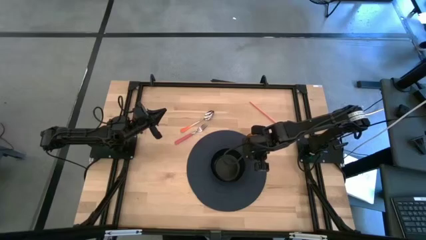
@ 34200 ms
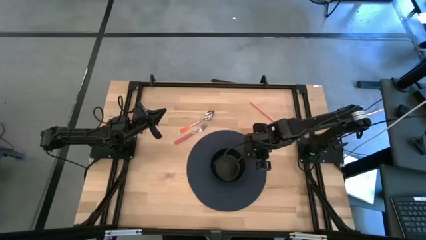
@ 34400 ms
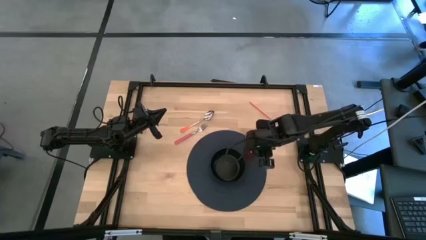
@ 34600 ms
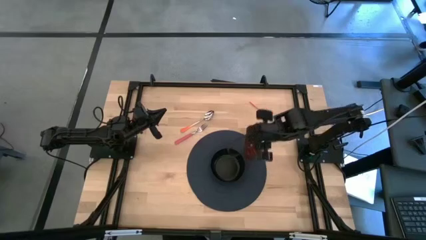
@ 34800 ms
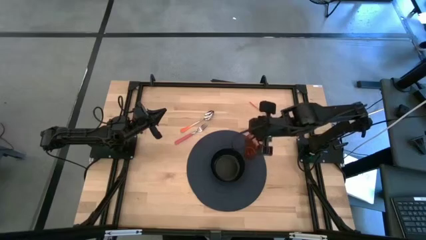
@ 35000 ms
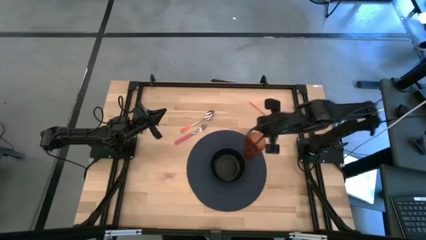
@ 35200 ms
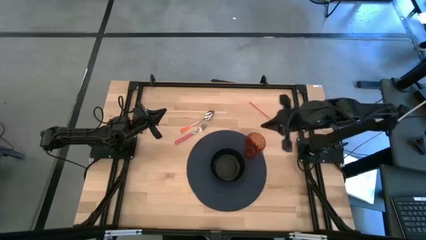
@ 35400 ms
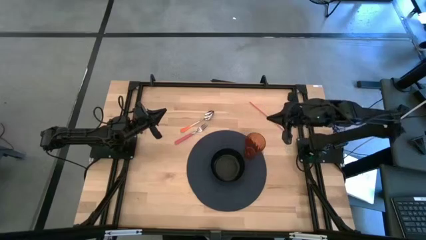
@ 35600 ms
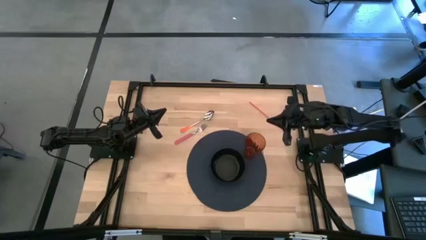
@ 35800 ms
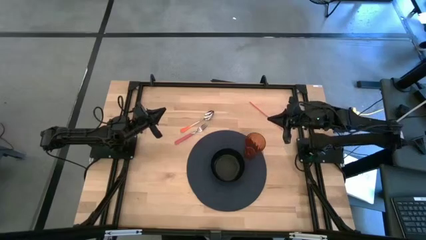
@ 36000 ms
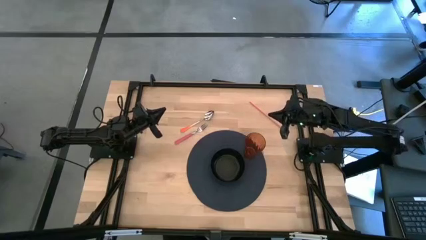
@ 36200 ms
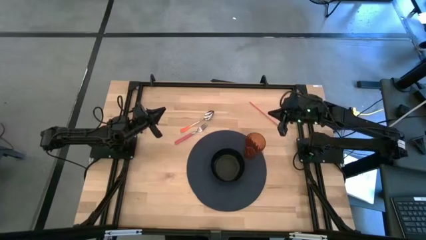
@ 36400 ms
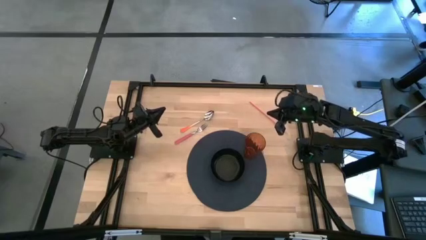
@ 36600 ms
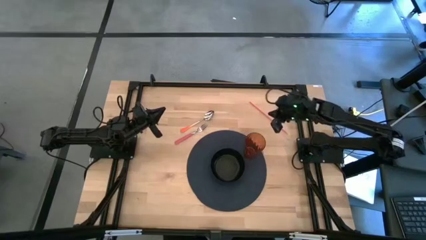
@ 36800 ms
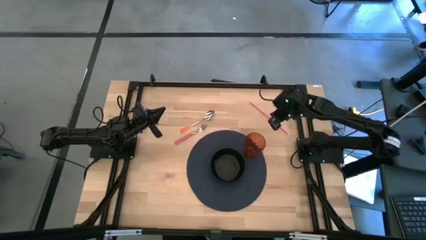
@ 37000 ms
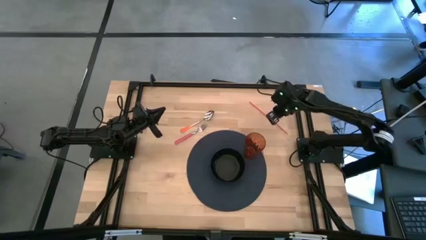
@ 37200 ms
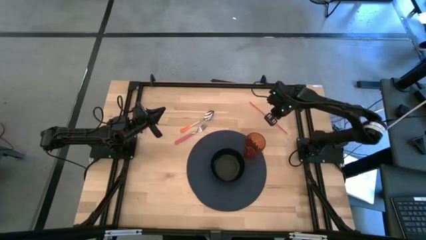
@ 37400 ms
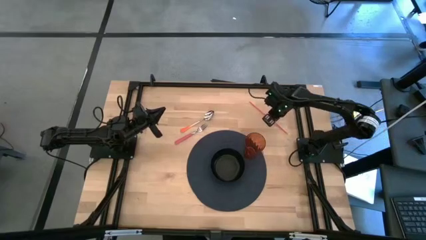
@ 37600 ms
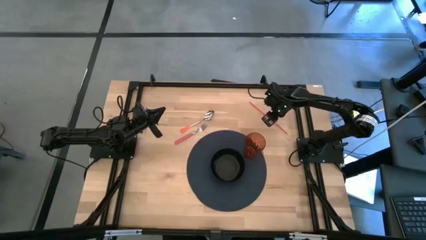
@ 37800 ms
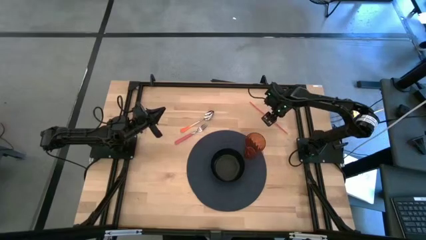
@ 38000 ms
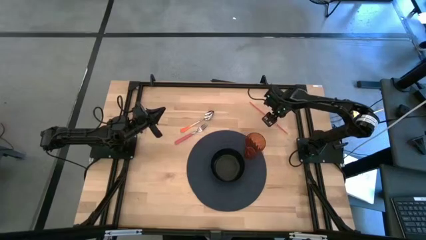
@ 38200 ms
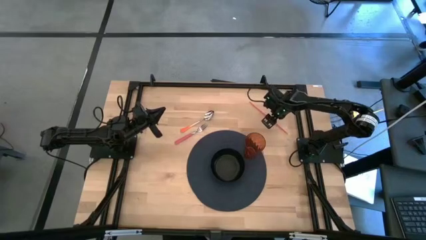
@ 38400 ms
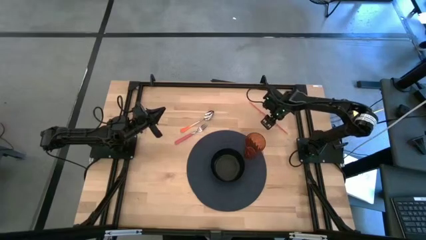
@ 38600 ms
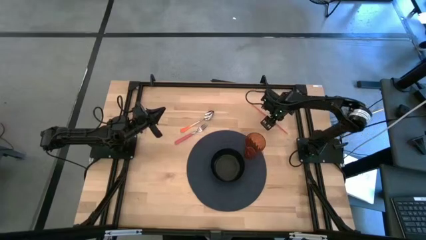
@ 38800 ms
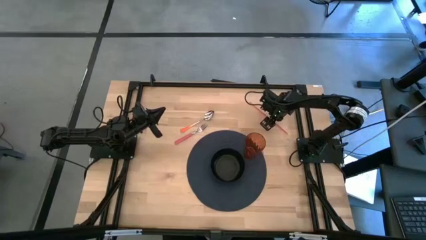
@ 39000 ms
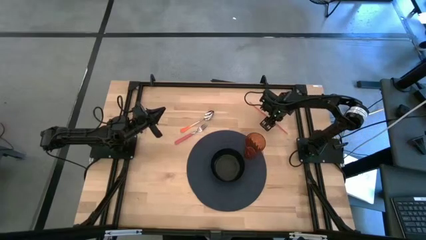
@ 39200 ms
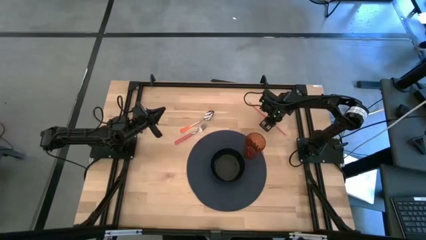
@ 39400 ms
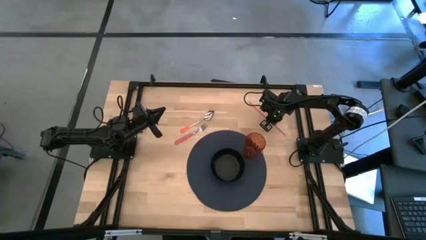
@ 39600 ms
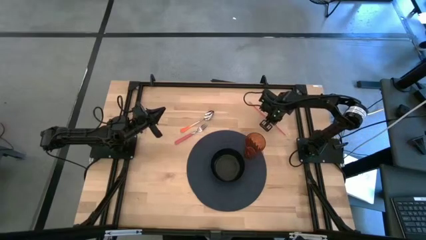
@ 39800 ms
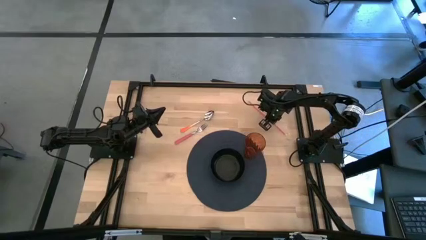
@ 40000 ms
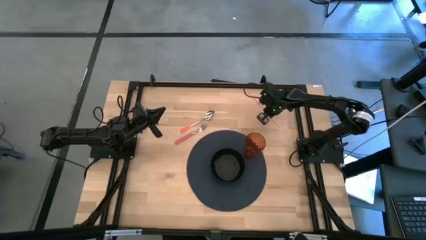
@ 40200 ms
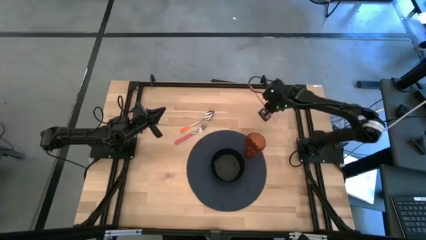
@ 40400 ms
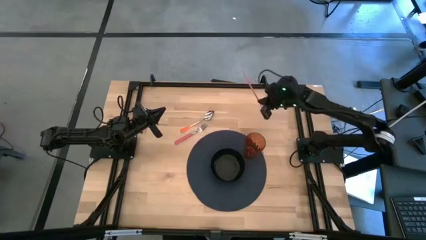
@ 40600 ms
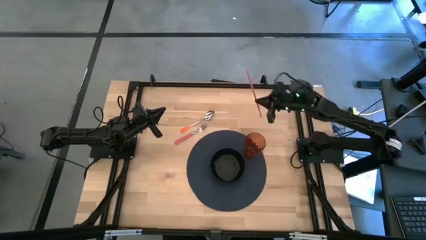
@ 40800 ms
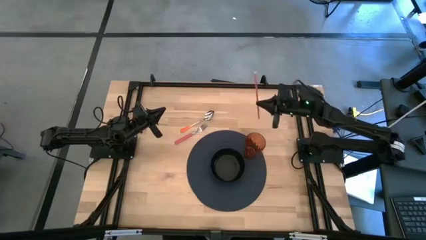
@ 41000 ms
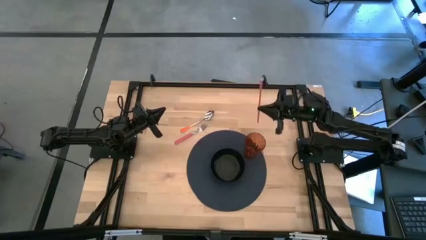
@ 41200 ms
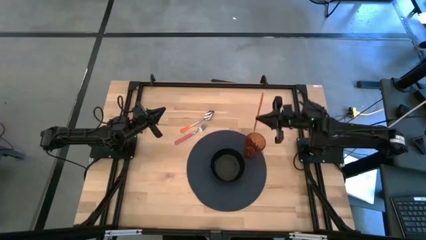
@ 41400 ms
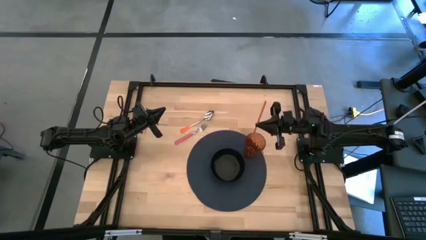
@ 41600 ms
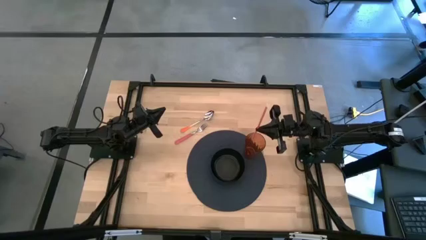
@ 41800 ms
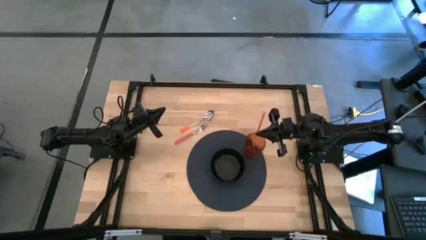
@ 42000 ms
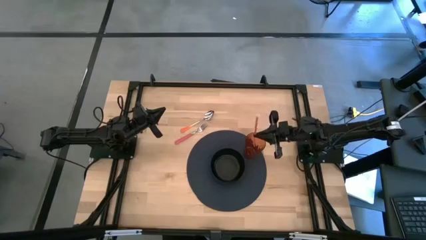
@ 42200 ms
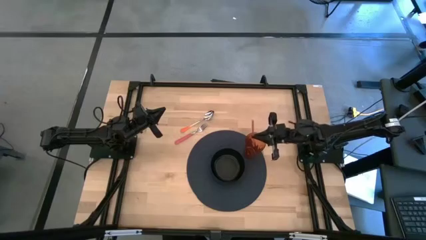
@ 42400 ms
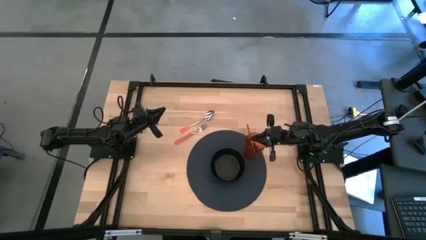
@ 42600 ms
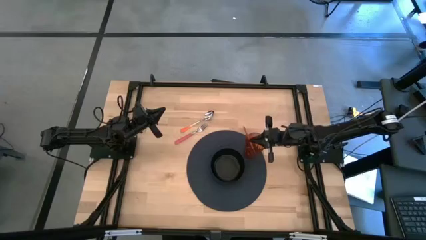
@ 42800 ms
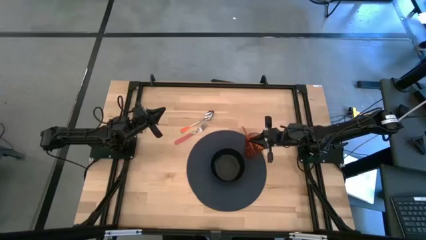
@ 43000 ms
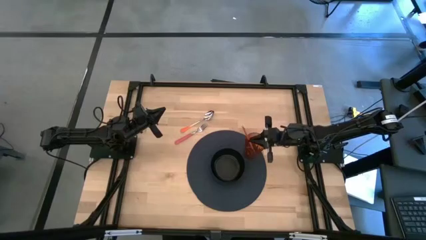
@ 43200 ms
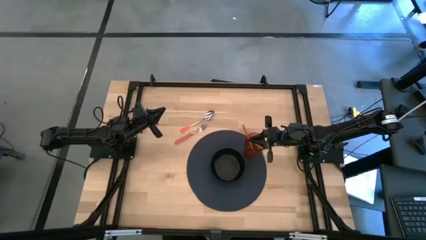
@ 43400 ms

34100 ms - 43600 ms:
Task: Pick & Place Utensil
Put the orange straw into the brown cup
